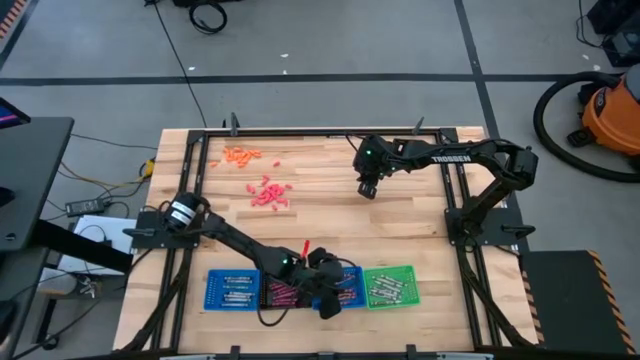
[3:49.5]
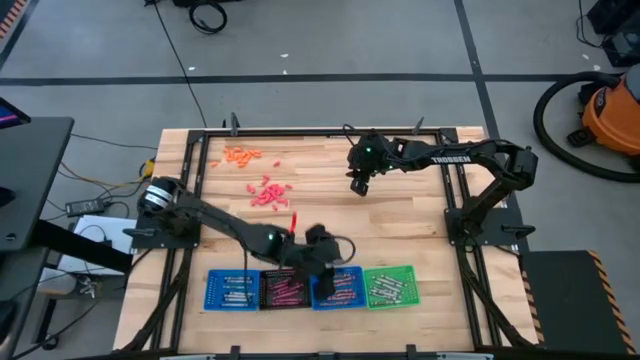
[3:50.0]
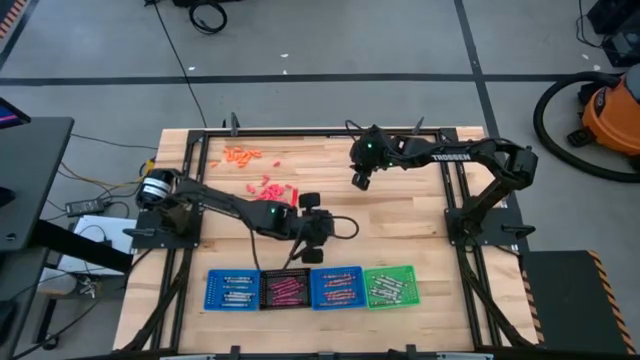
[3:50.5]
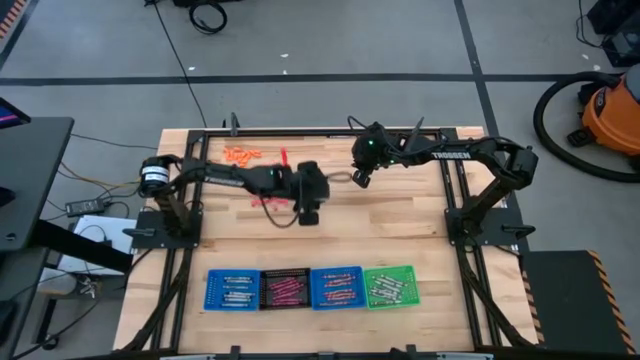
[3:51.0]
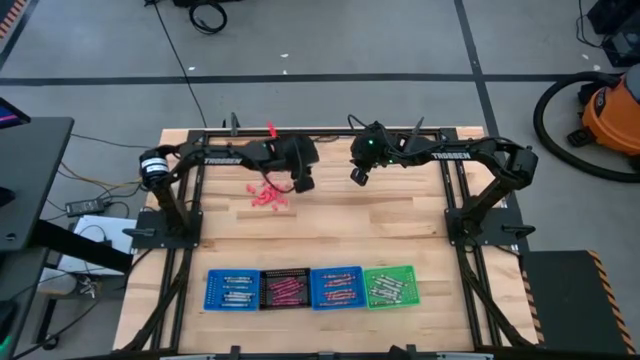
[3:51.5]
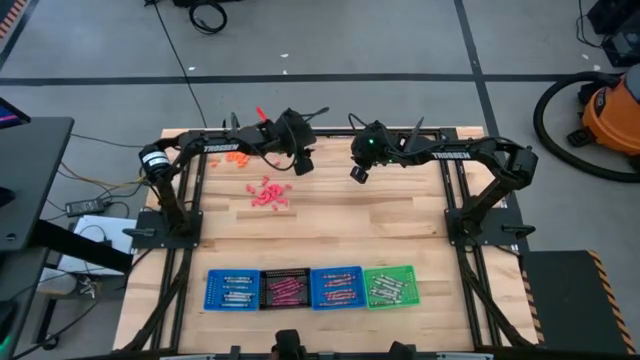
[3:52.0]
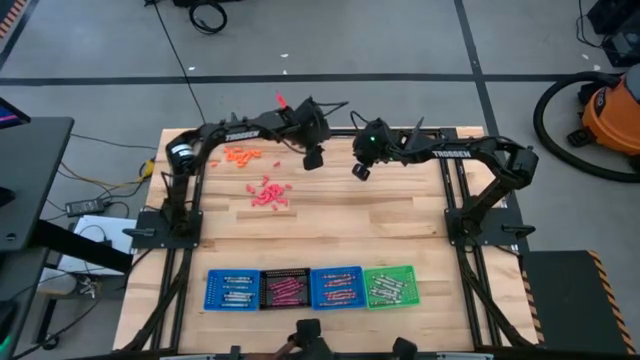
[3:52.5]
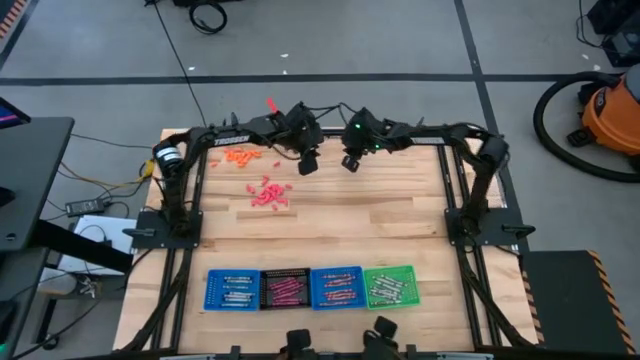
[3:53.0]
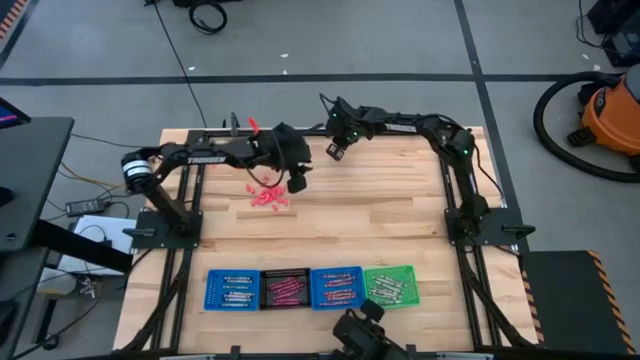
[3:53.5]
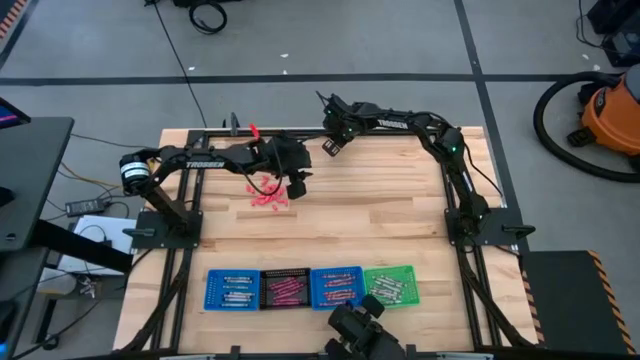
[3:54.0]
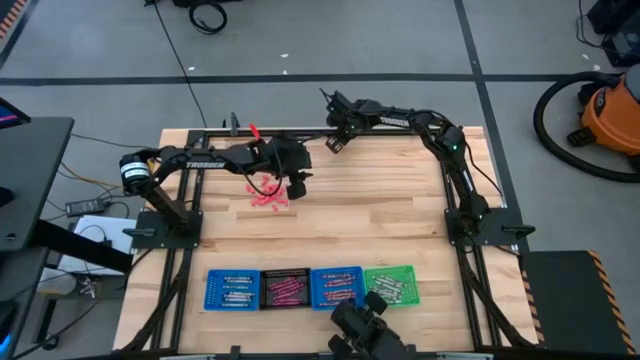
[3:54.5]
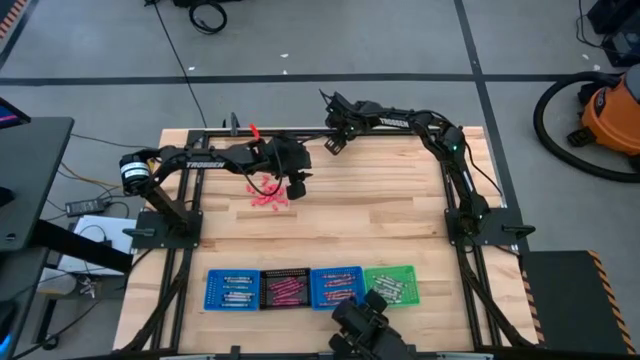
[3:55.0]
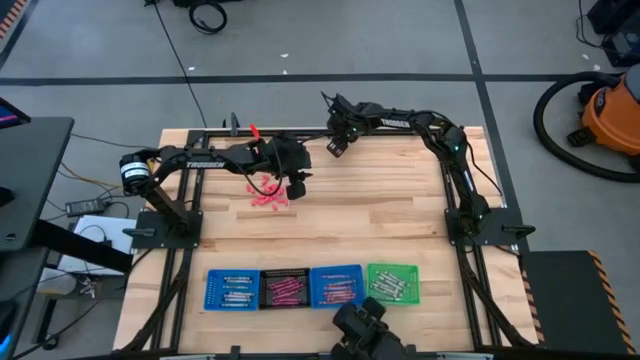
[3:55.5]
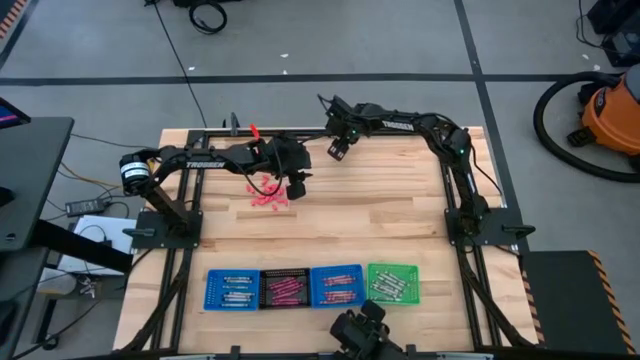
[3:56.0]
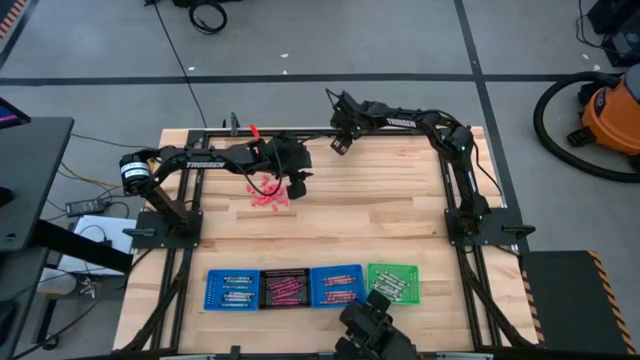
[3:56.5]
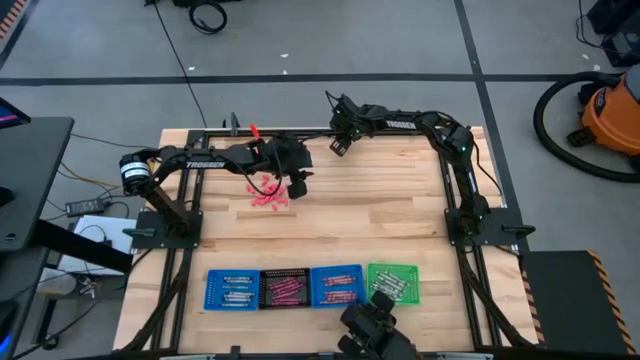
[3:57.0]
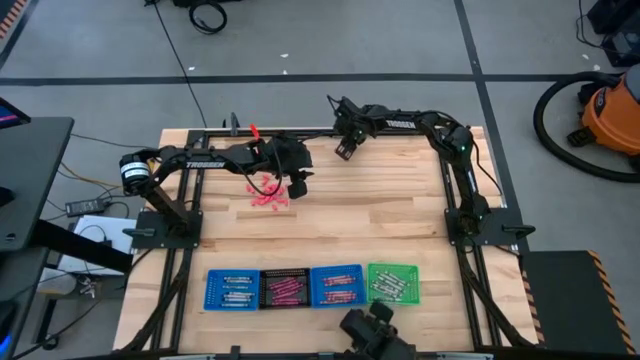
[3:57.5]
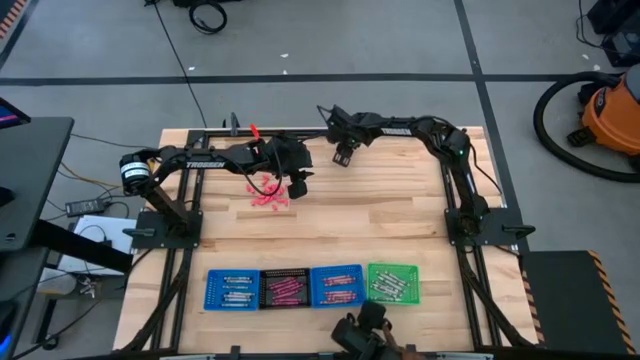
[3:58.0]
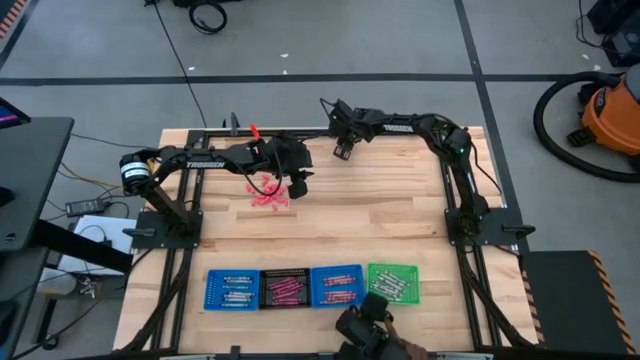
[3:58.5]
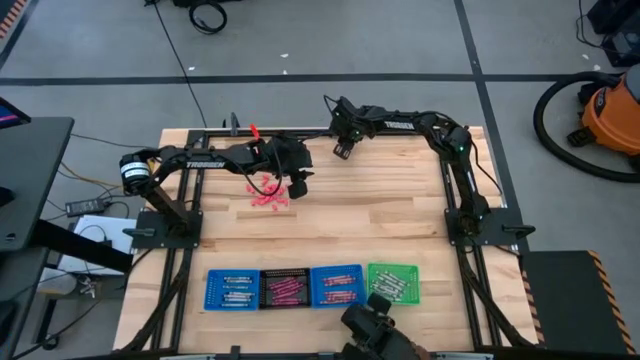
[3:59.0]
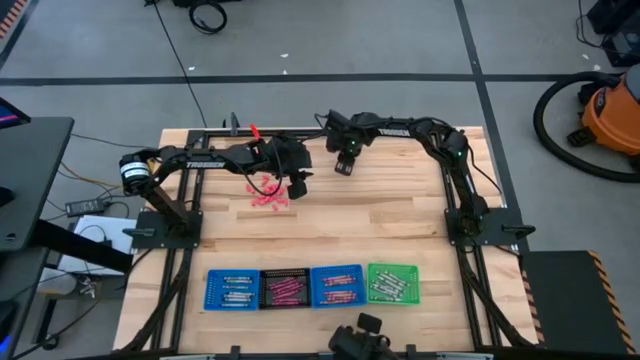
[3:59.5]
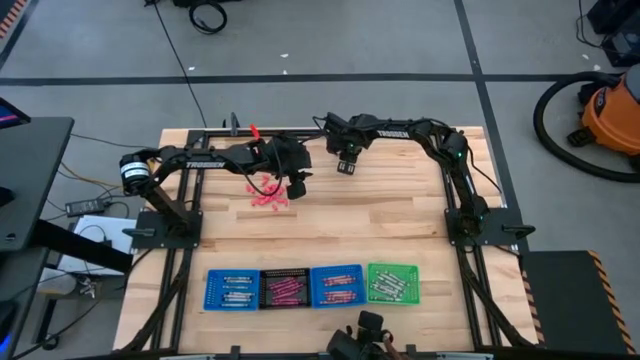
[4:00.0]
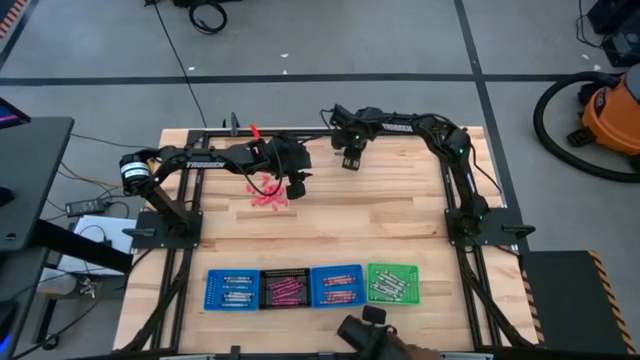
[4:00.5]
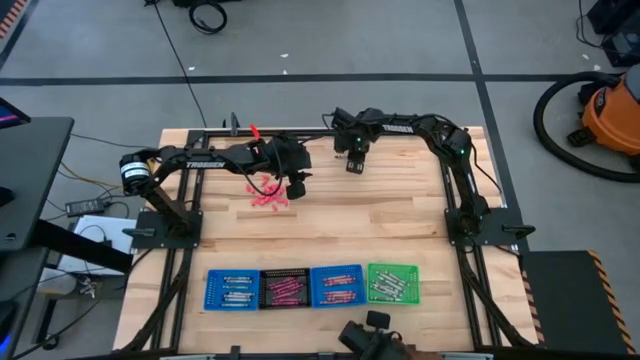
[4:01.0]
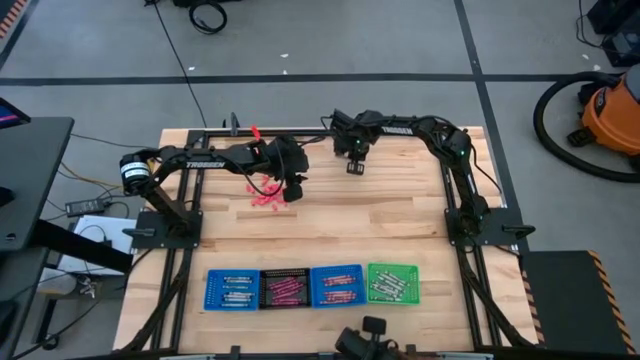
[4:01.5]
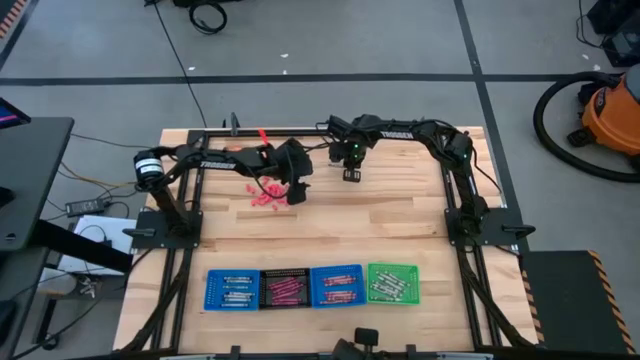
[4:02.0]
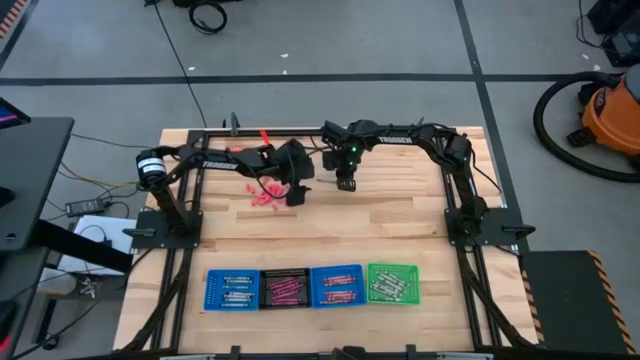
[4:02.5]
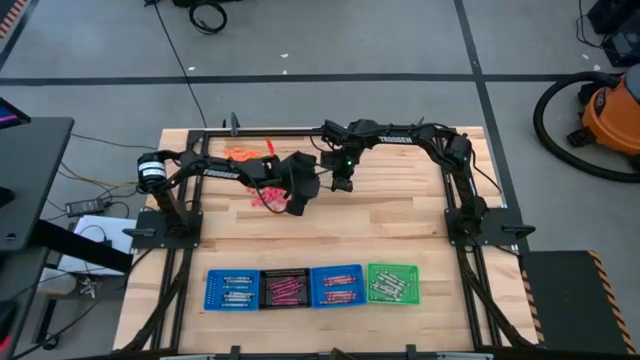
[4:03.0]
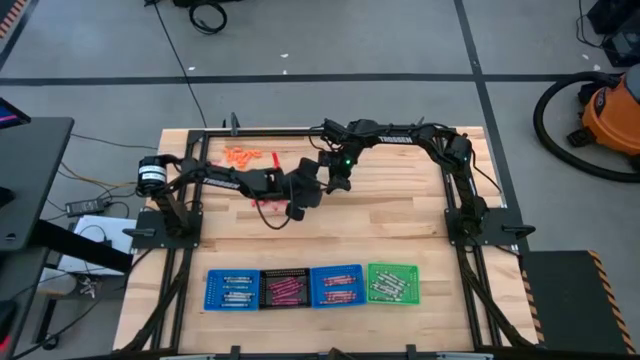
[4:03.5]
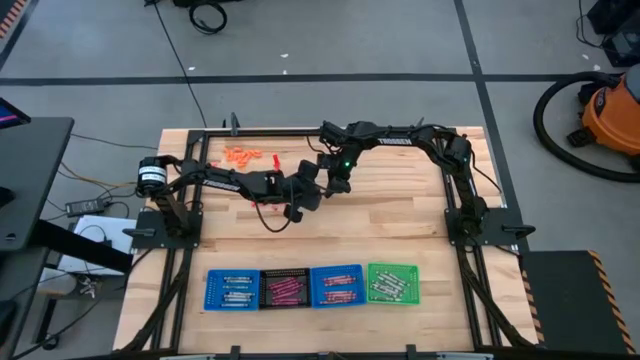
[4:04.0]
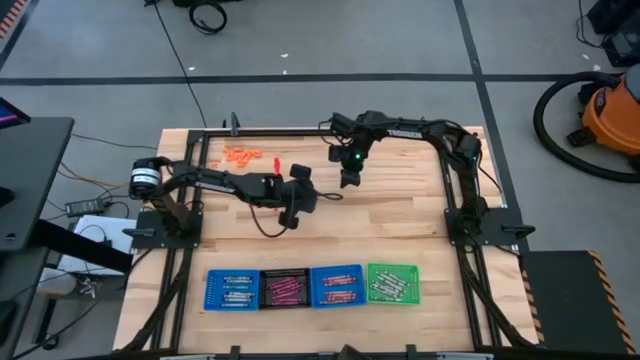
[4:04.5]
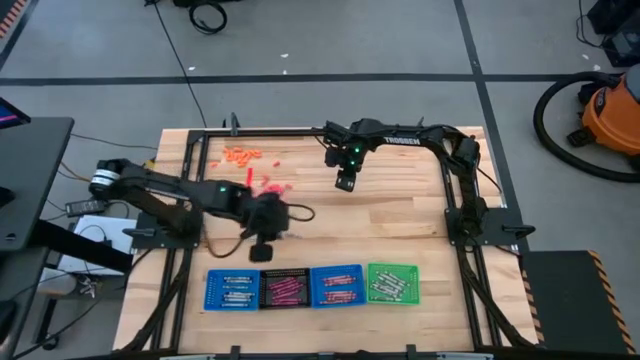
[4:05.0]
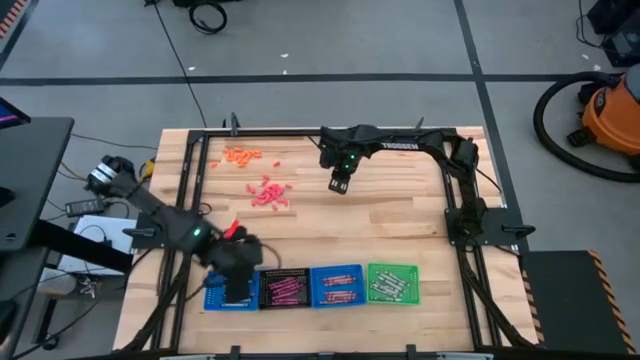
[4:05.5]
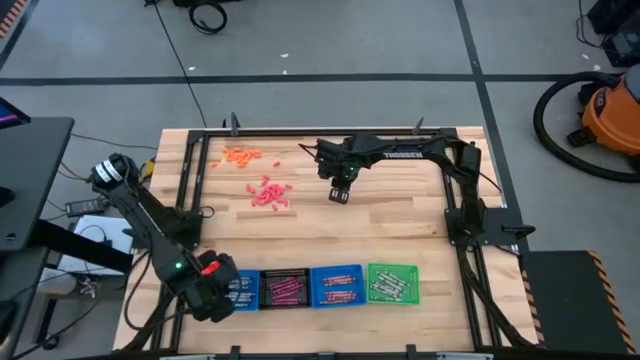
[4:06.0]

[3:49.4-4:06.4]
Task: Sort crayons
Put the black crayon into the left blue bin

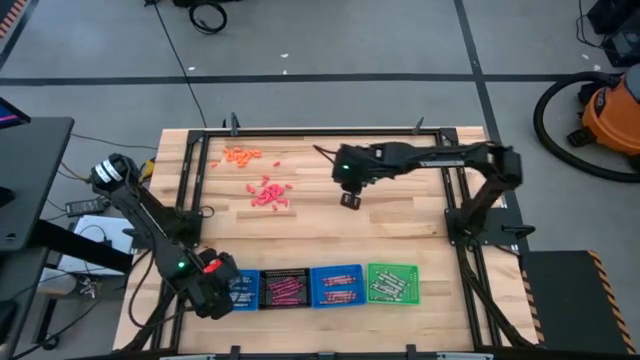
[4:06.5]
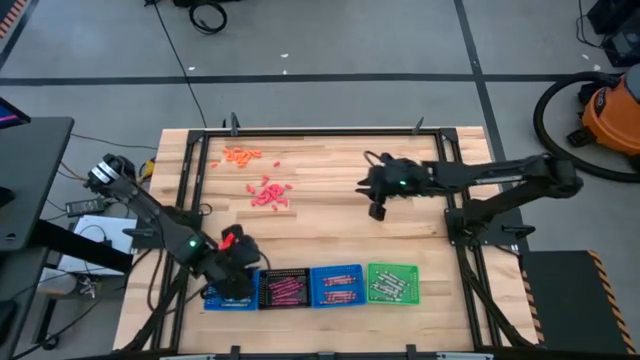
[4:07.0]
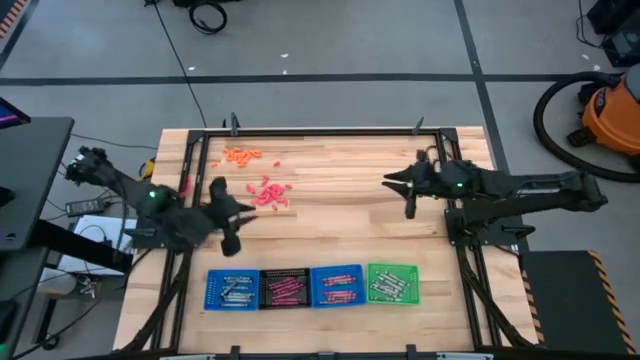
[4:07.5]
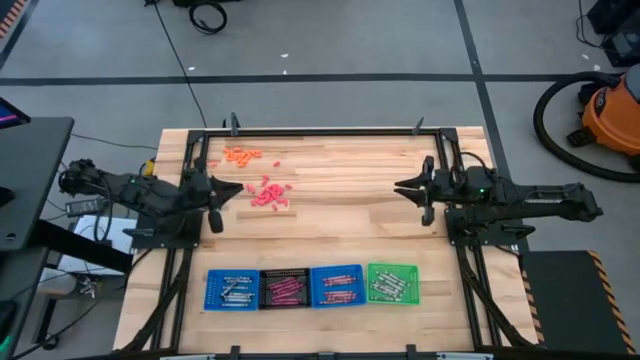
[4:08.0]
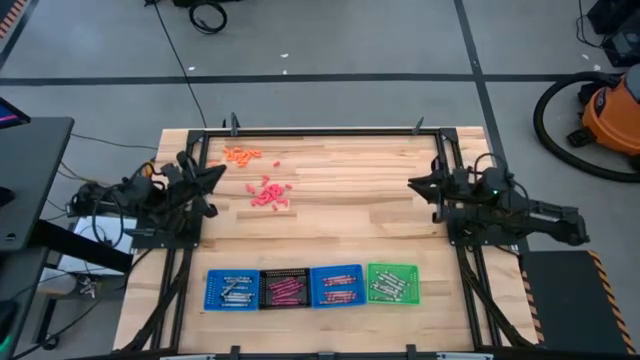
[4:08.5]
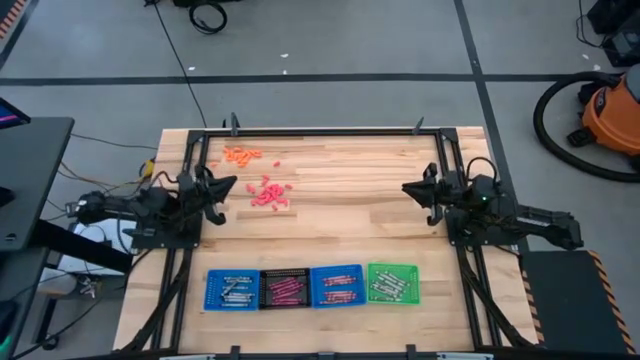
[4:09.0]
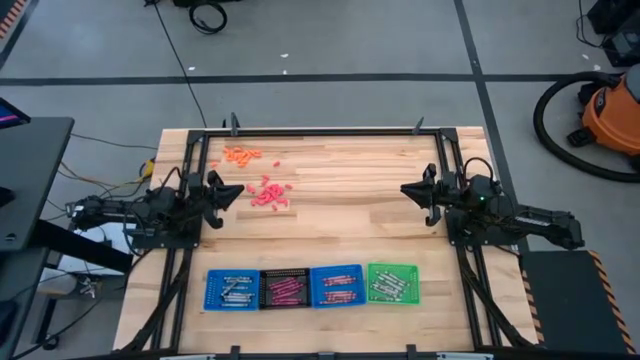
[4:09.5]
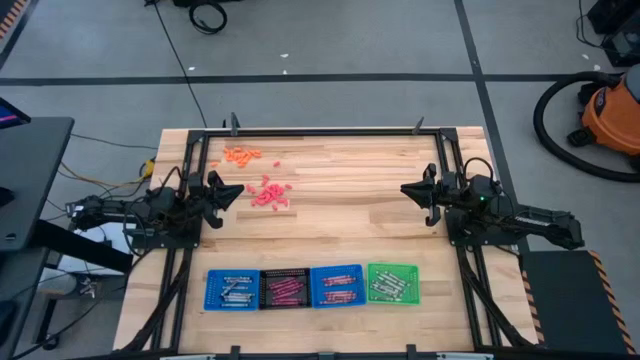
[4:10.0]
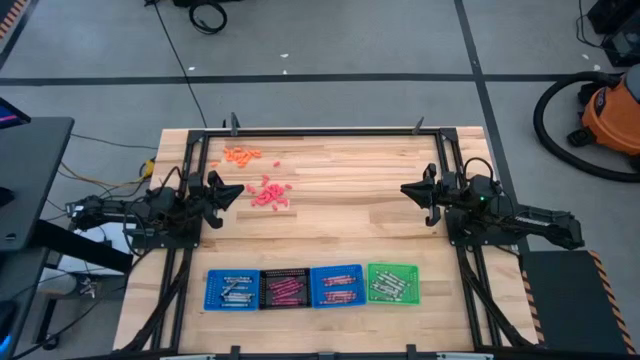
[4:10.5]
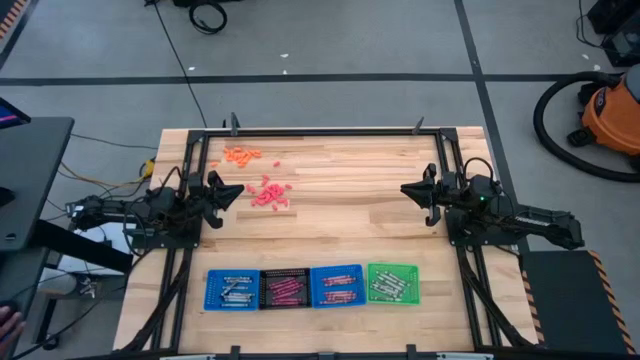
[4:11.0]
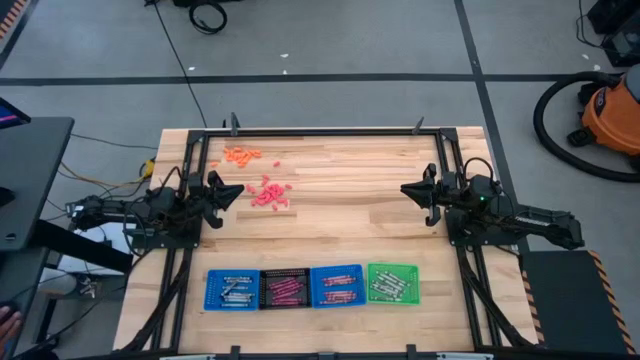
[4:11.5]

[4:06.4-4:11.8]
Return to Home Position
